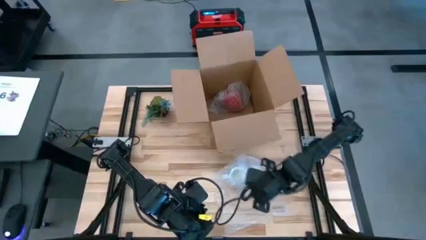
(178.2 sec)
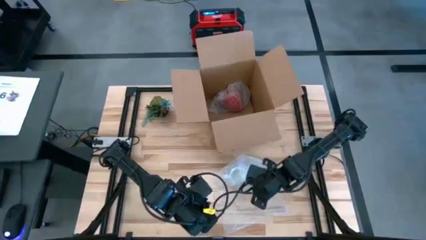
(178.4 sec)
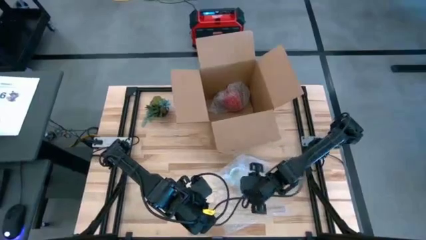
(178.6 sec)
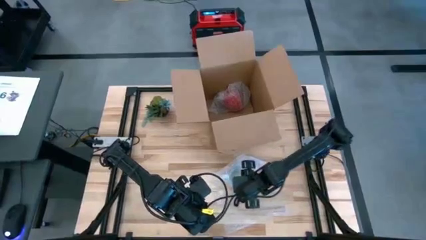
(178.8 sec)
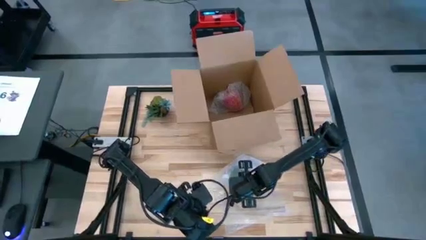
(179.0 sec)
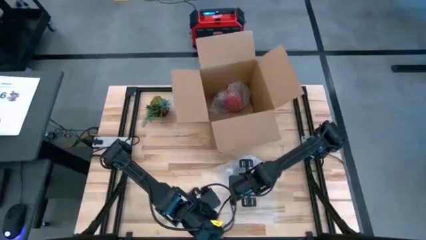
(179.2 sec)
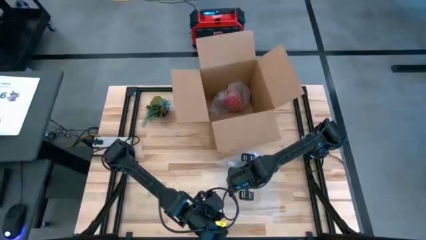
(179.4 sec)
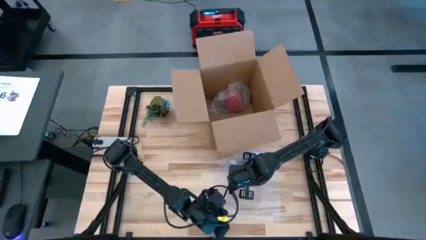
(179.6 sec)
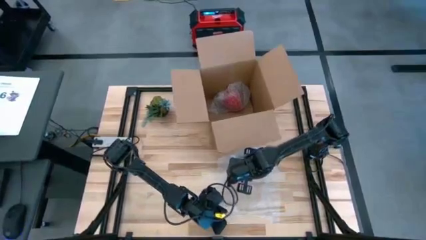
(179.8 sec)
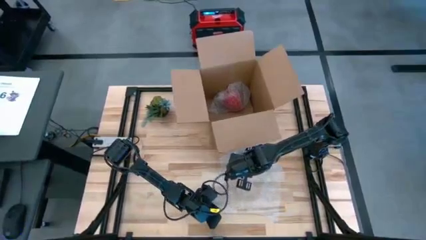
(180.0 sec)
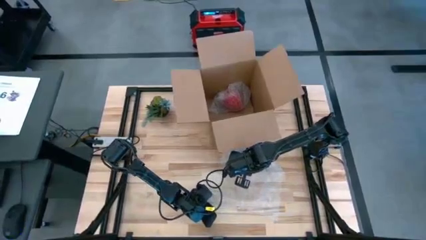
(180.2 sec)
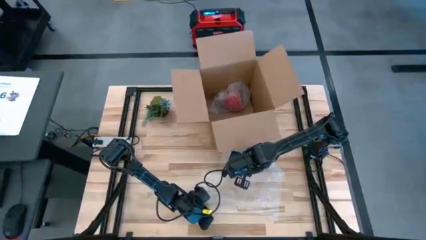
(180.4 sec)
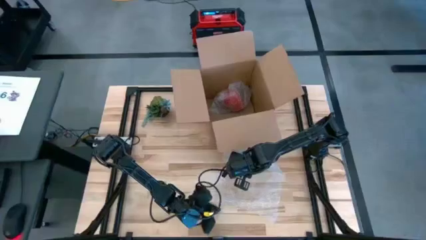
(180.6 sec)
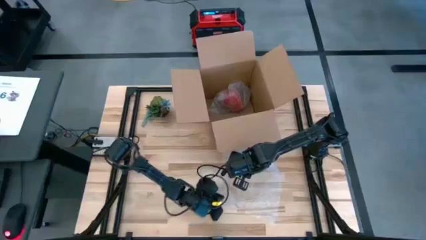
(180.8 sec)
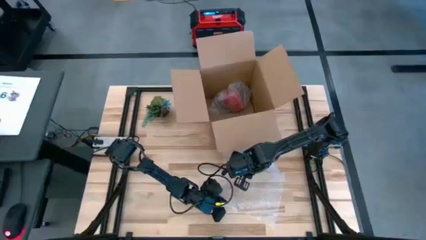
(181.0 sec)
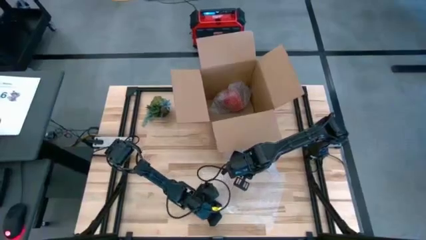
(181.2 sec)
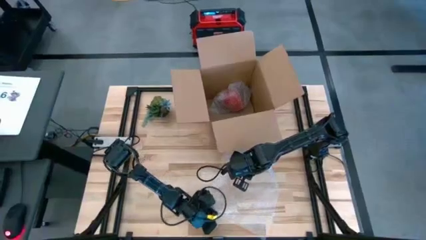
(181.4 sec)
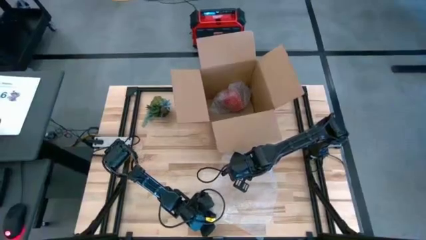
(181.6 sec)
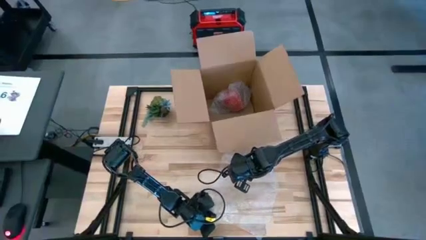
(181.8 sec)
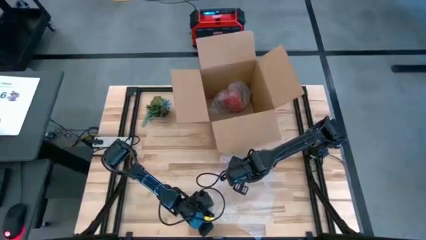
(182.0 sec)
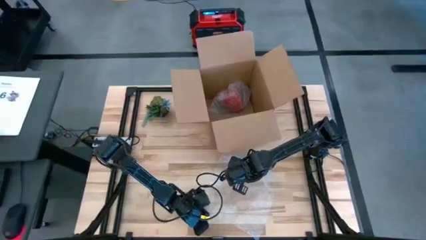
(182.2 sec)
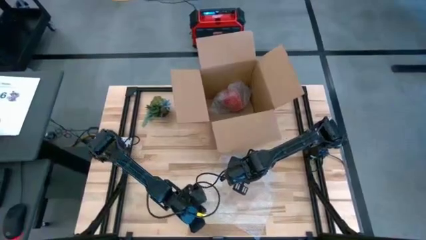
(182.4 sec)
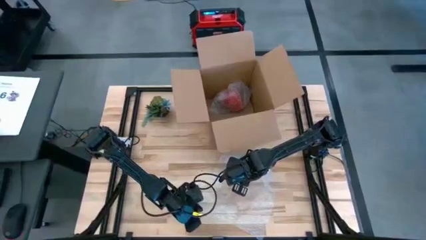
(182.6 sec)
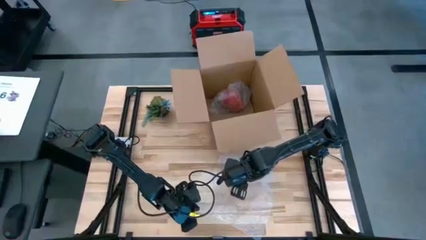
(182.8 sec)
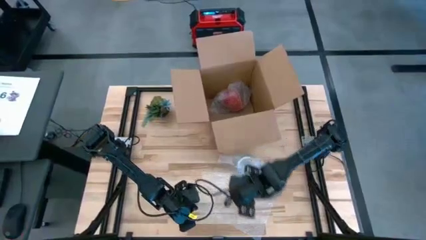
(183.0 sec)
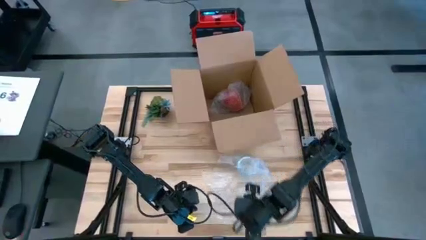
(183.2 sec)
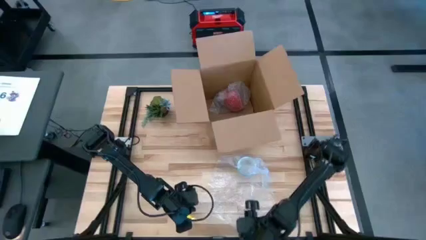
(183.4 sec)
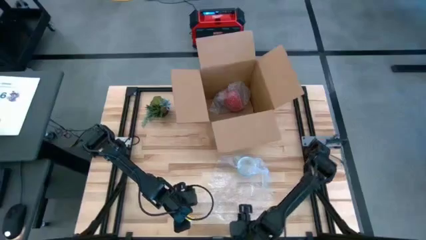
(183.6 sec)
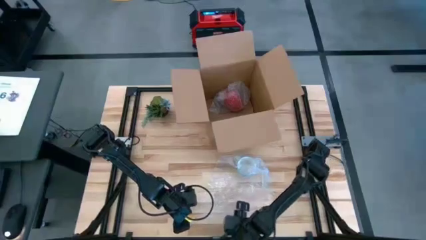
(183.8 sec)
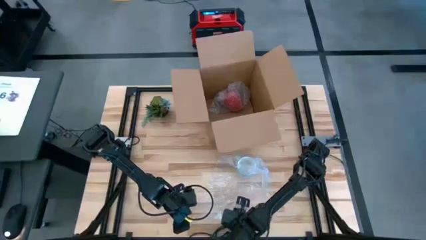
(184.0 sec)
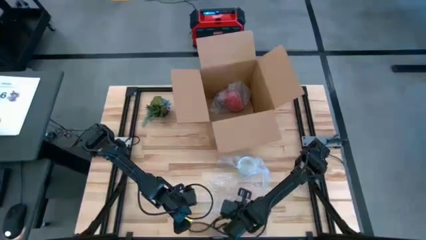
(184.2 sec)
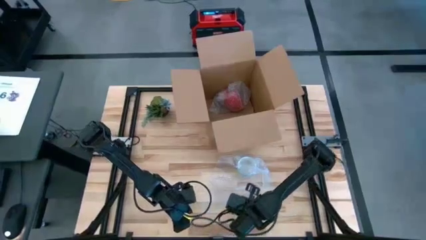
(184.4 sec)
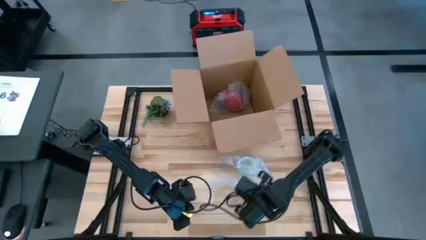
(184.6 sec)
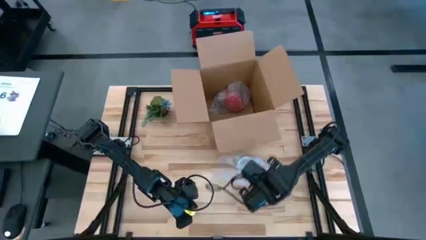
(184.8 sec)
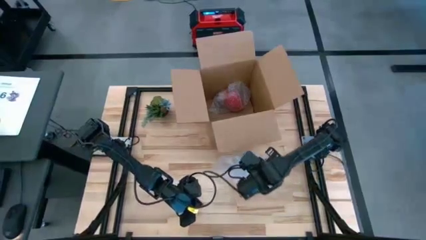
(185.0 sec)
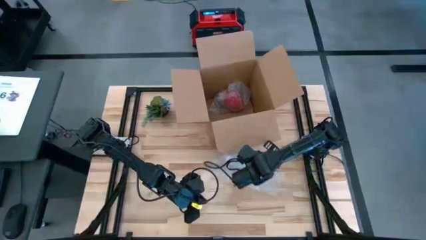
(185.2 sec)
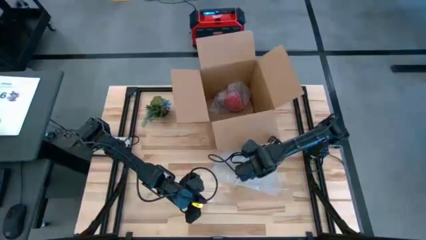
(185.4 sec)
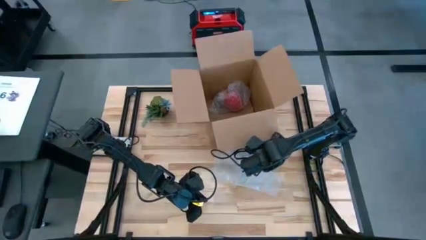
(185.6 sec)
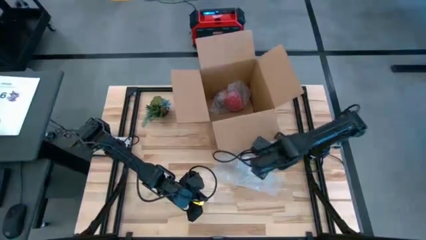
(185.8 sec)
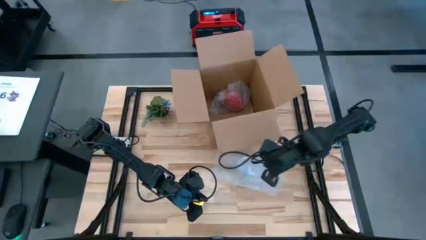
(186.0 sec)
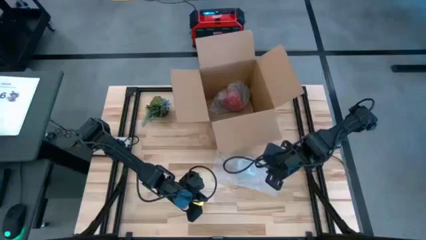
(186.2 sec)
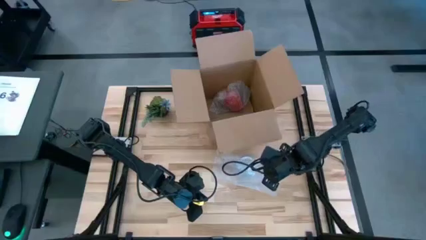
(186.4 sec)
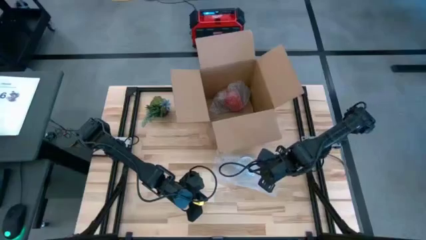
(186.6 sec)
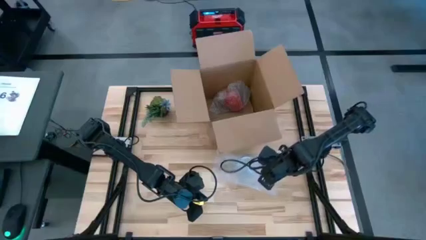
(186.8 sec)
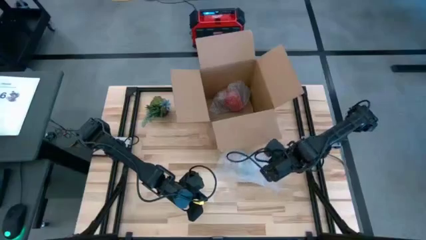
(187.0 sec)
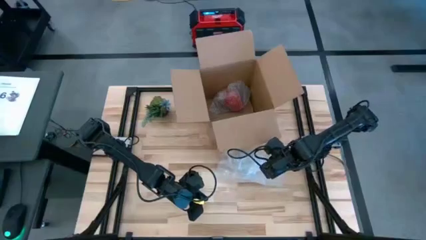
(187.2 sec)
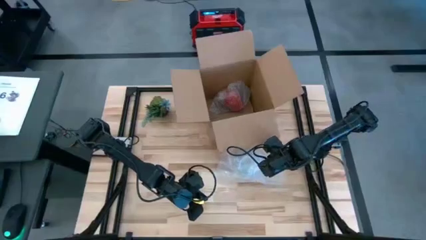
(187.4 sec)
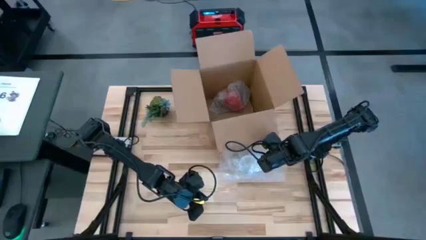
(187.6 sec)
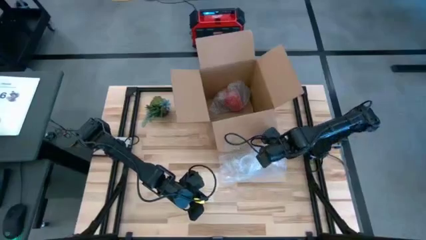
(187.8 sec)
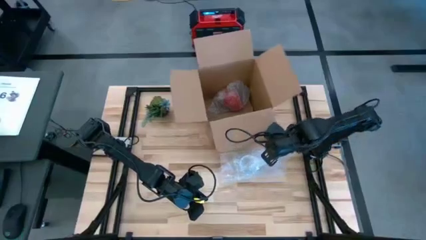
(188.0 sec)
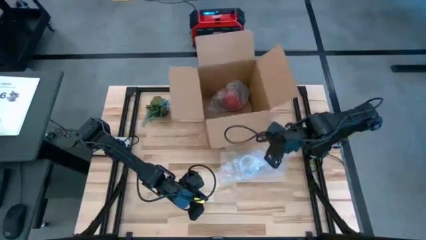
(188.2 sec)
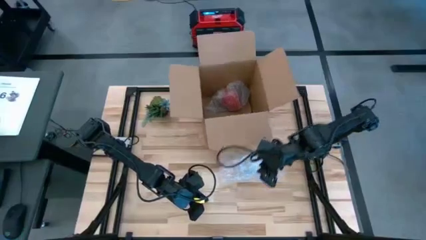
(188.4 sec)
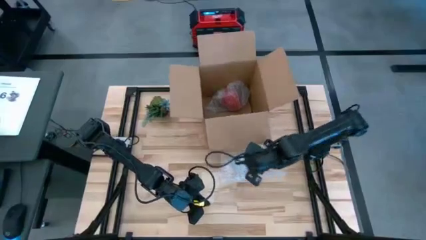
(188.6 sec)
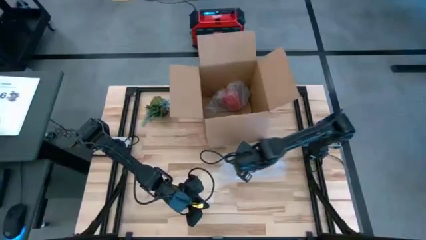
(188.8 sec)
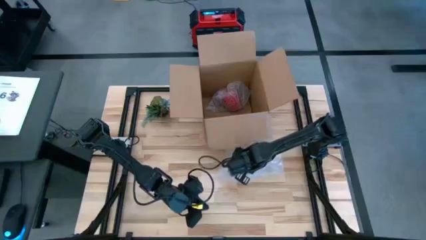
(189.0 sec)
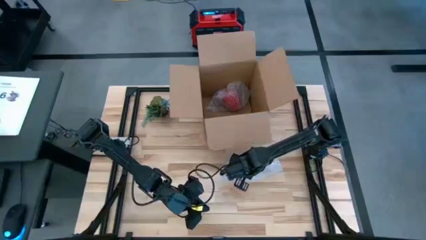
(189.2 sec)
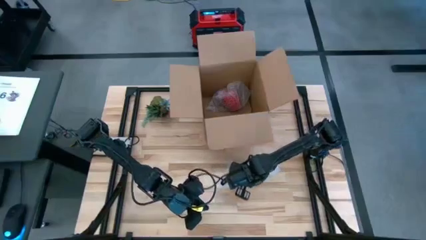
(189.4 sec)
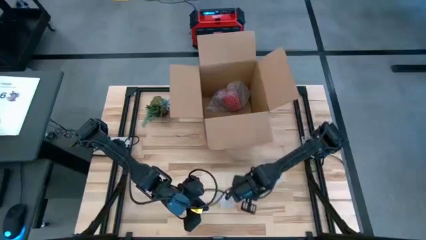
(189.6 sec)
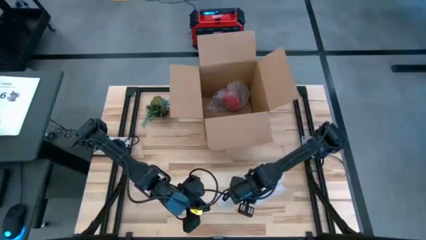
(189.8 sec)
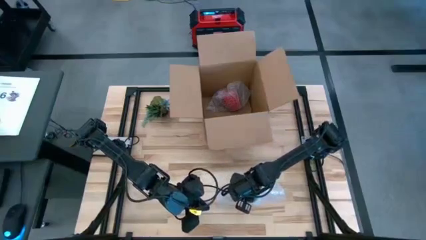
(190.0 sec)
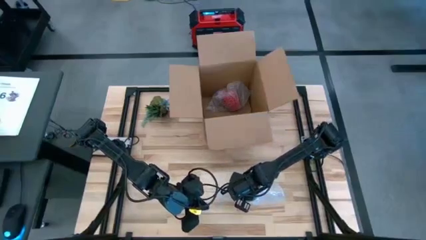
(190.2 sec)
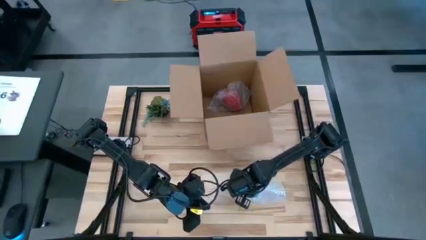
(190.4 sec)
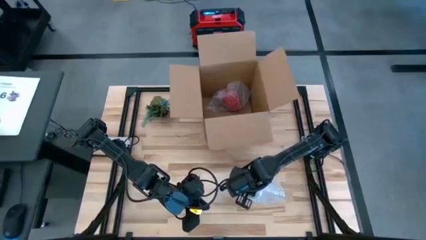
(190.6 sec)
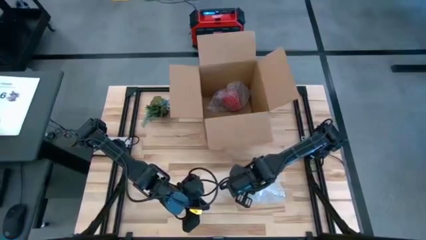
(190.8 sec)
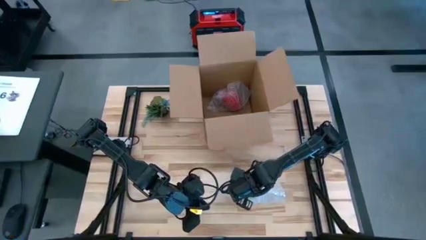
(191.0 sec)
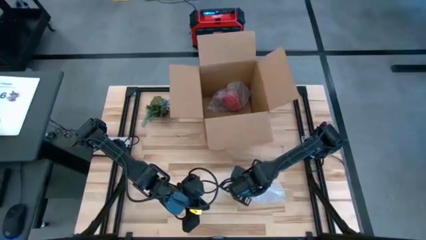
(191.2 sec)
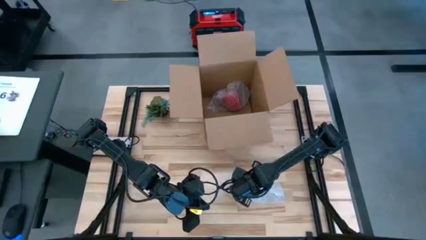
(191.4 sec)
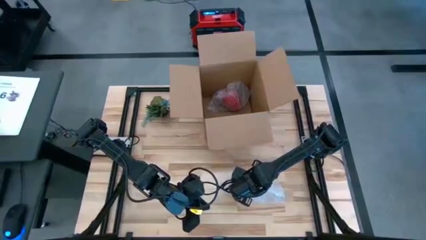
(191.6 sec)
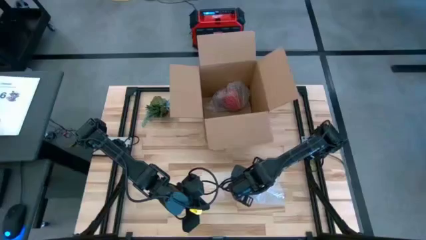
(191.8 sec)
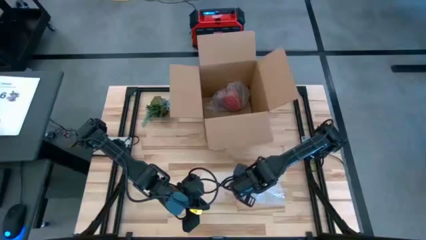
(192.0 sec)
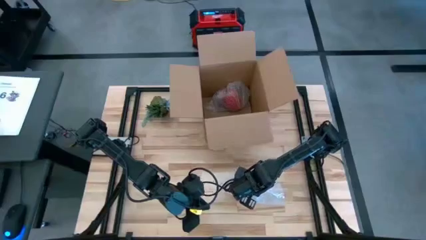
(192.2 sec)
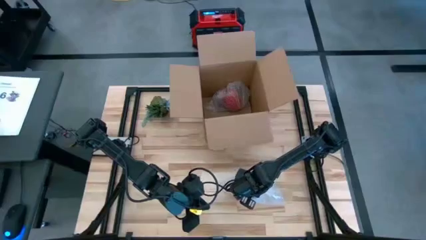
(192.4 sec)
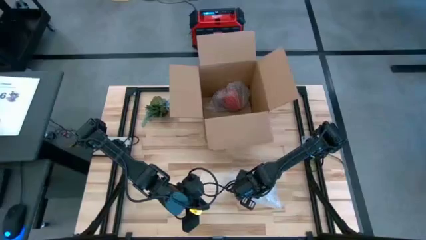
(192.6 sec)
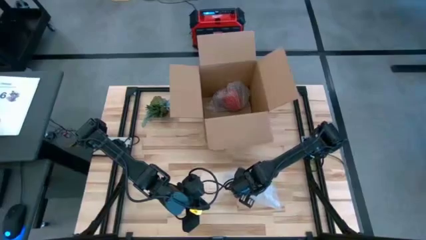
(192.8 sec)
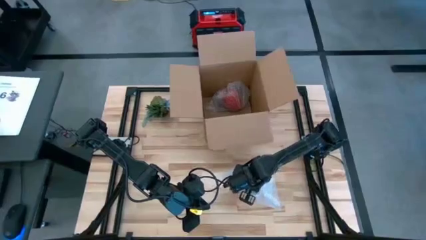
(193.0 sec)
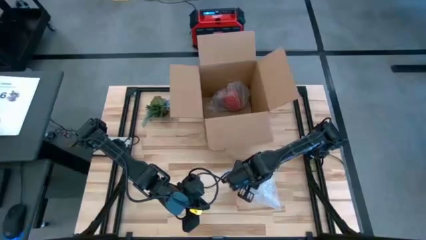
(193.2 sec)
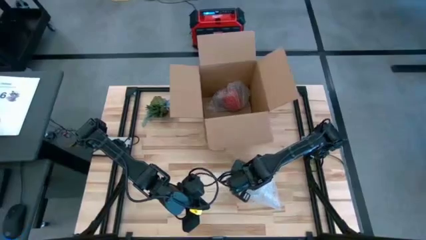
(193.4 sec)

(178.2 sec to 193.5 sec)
Task: wrap mug
Wrap the white mug with bubble wrap
